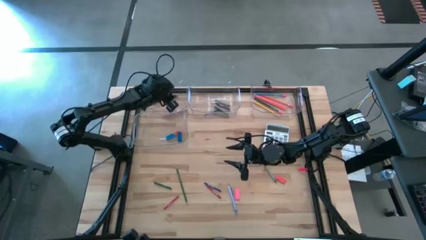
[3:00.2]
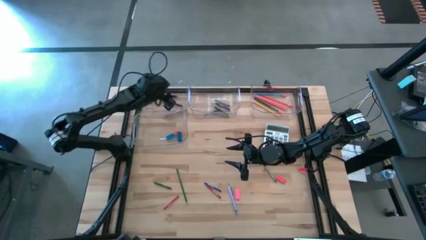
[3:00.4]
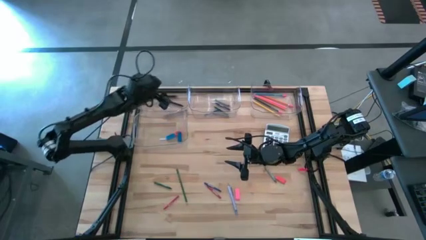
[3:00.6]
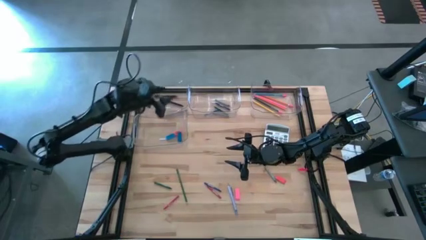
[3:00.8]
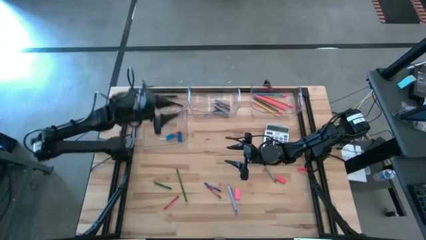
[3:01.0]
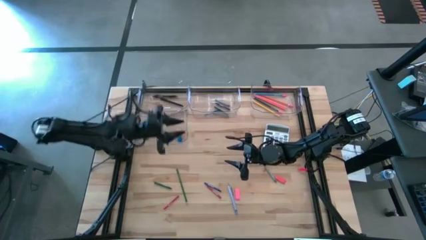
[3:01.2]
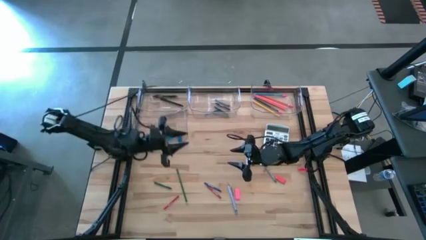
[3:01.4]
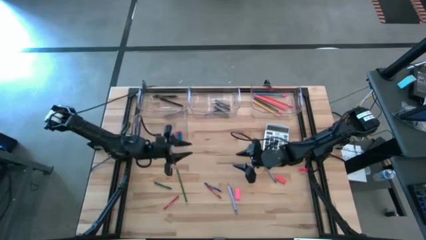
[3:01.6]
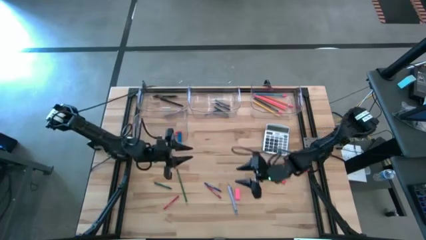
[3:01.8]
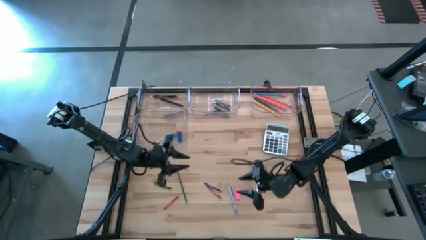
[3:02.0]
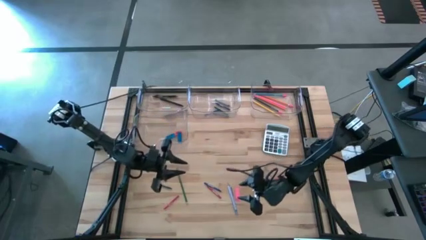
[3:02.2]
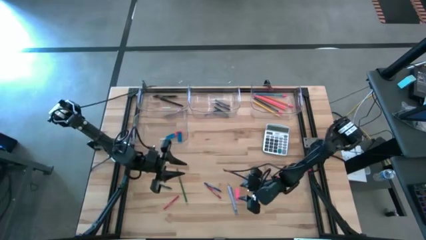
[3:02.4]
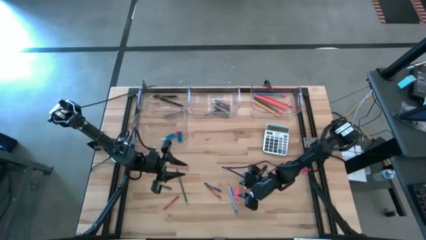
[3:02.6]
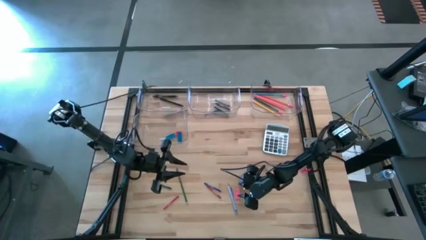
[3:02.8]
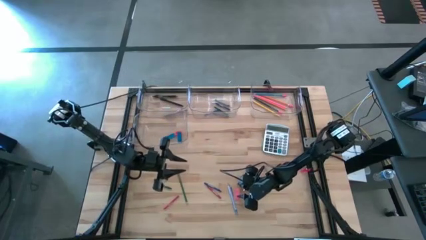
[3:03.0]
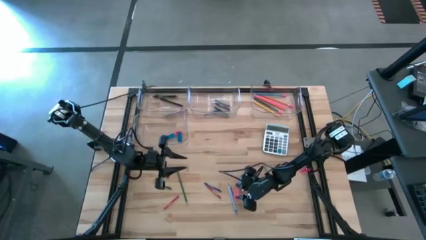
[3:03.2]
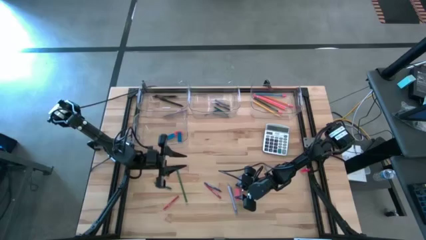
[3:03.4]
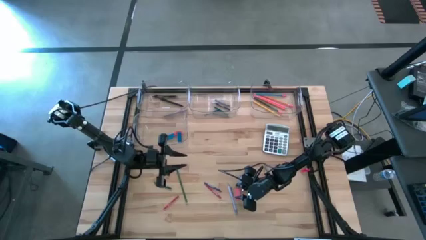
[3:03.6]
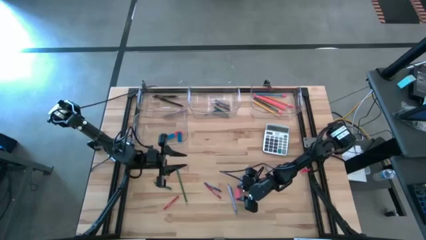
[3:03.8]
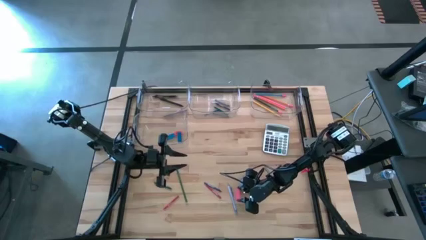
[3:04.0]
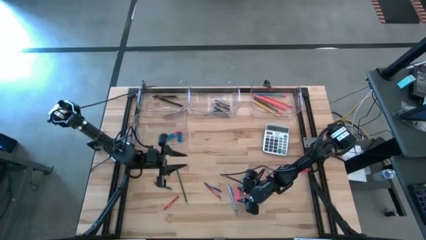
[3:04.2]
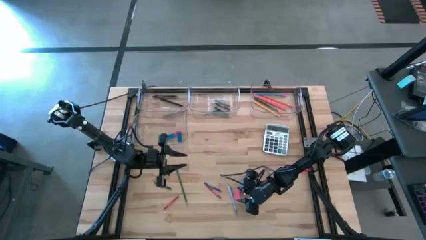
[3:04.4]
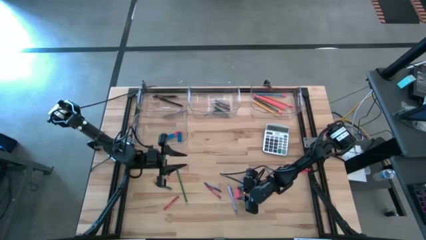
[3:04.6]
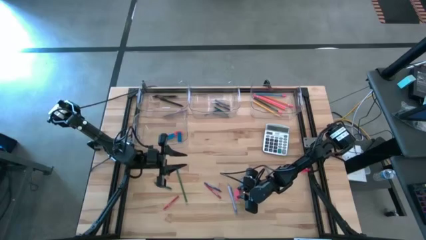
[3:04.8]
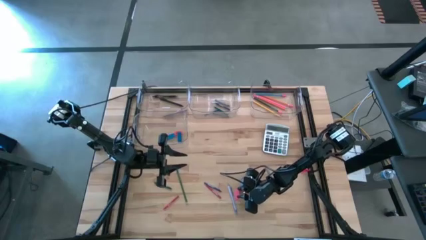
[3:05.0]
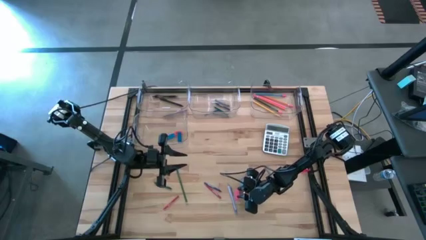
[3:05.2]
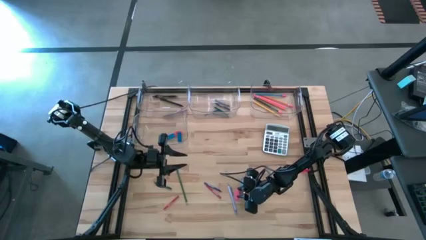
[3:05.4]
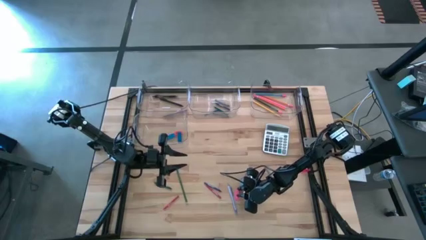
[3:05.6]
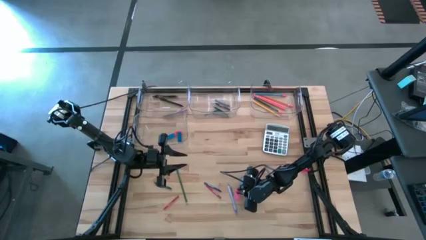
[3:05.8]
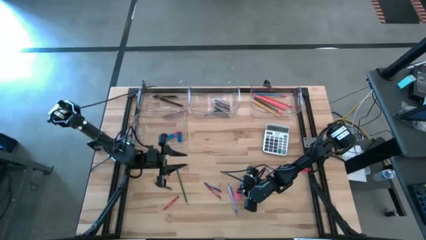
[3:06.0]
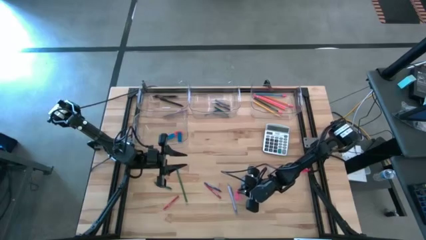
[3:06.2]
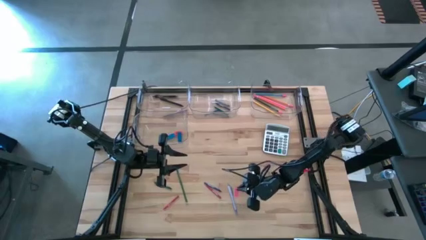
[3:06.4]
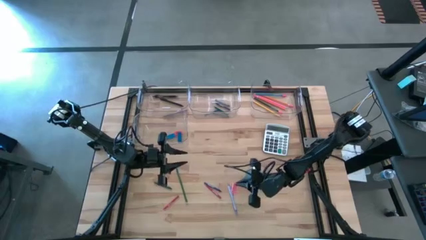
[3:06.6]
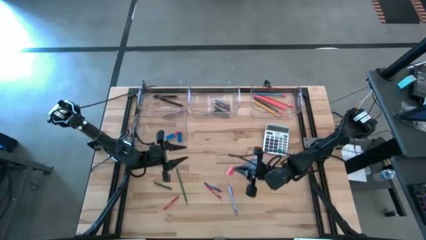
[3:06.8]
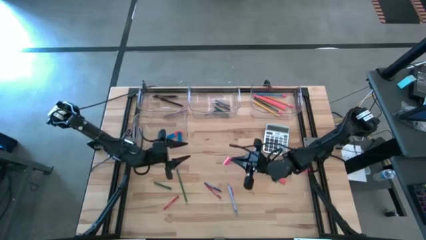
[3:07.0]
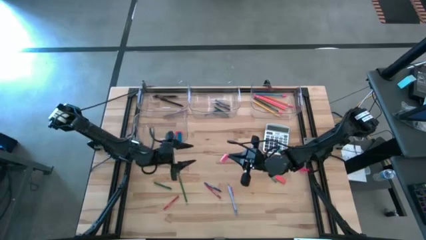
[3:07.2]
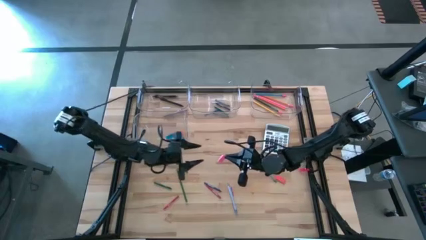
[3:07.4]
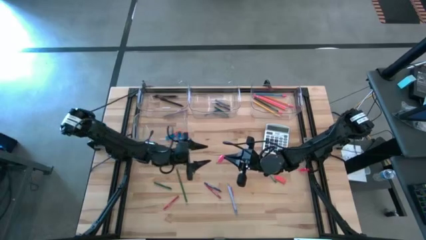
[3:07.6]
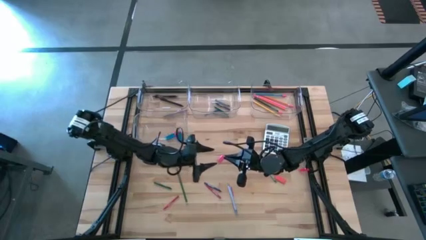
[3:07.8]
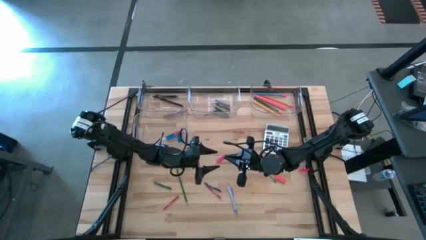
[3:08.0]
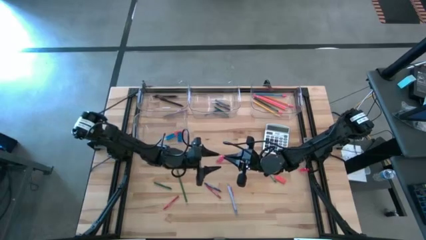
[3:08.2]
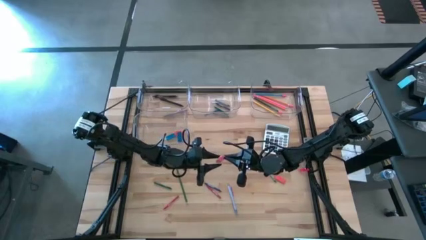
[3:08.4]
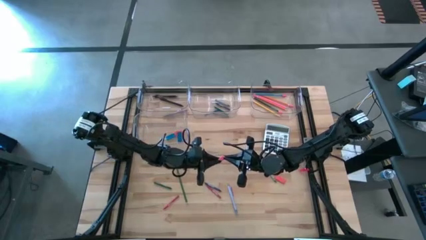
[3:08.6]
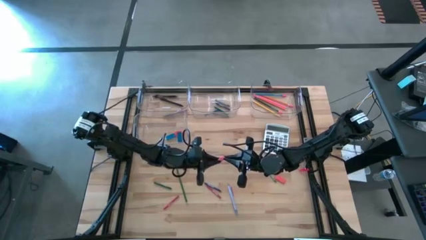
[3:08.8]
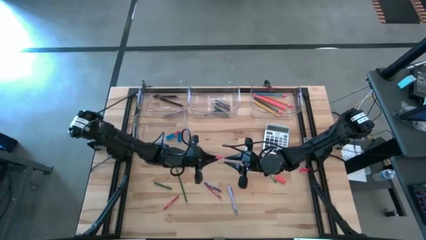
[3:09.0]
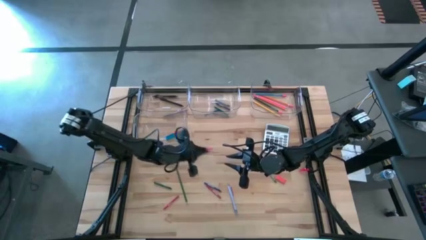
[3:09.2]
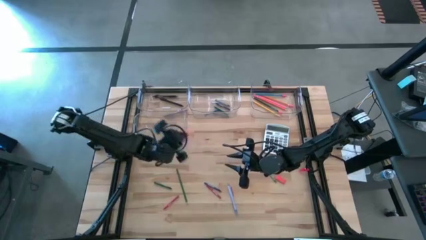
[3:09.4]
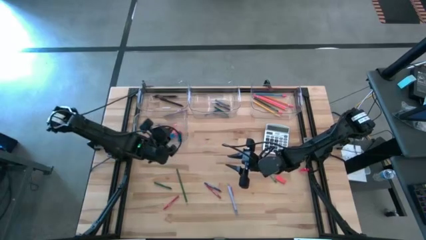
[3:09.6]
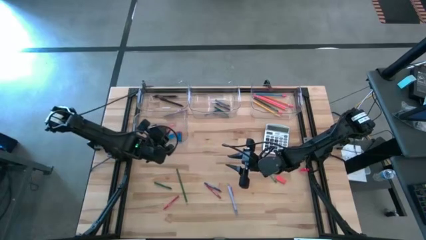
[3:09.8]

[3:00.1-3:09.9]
Task: Sort crayons/erasers/pens/pencils in bins
Put the pink eraser into the bottom transparent bin

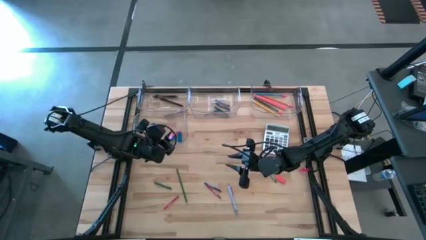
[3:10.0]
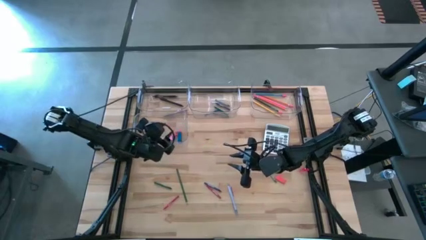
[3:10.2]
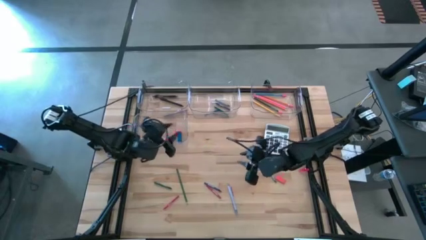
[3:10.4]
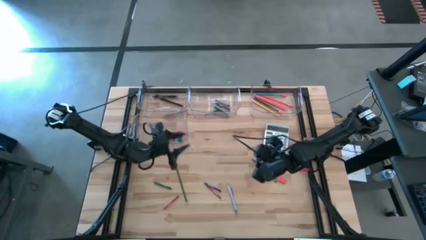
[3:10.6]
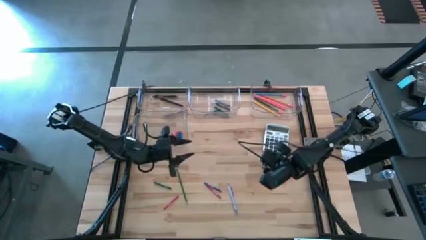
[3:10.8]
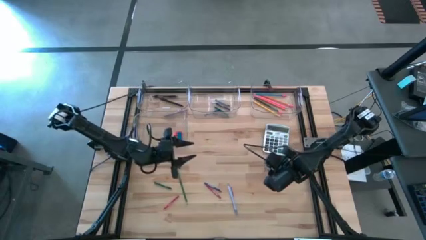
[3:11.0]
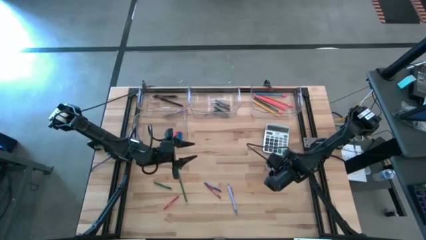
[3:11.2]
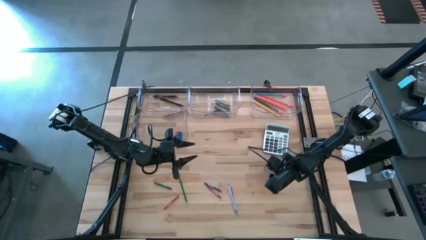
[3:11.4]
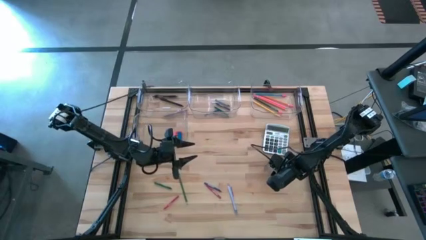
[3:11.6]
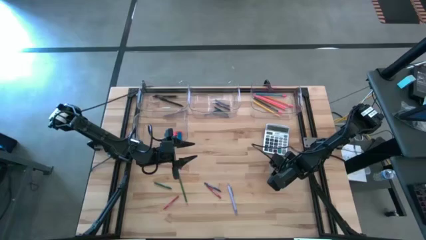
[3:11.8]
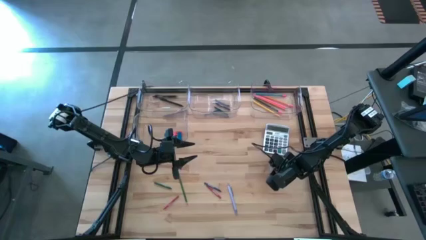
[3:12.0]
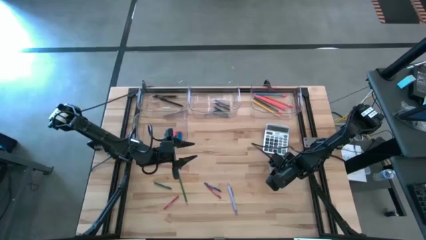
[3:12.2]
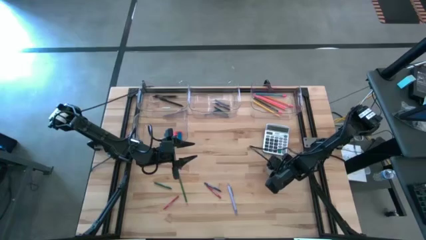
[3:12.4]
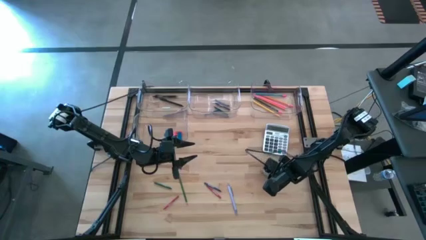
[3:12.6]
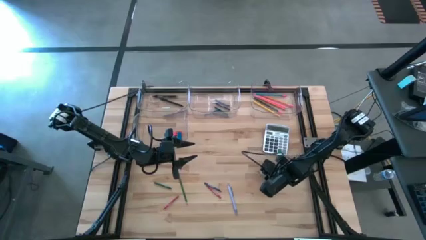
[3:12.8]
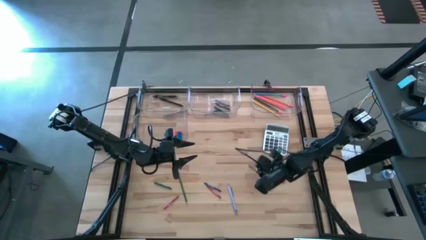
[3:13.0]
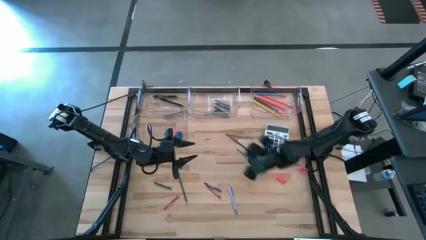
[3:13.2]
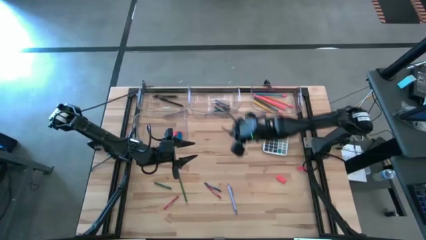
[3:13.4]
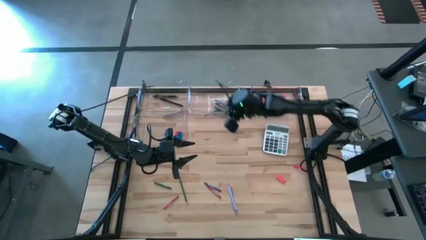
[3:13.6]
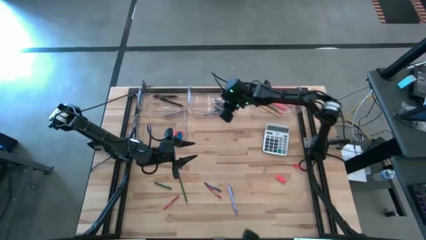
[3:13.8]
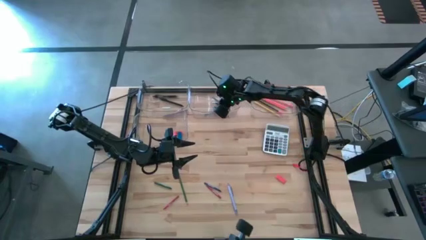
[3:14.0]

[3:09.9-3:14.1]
Put the gray crayon into the top center transparent bin

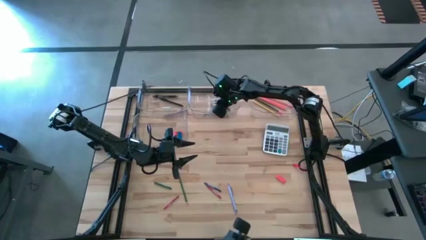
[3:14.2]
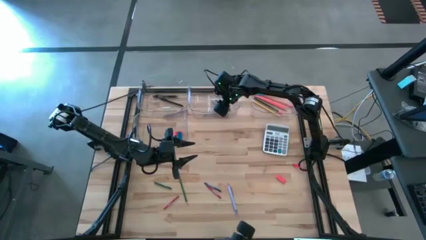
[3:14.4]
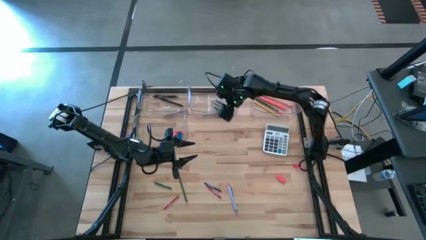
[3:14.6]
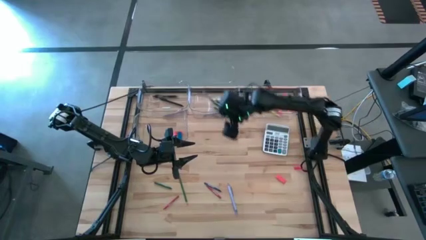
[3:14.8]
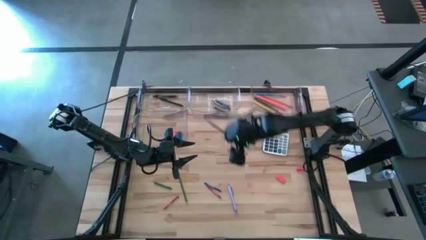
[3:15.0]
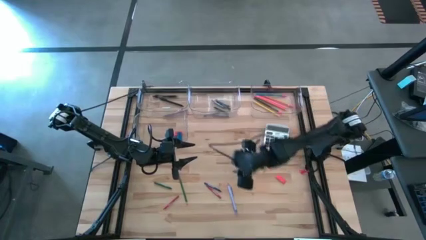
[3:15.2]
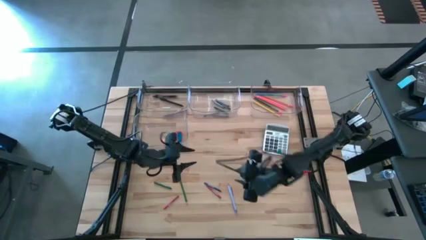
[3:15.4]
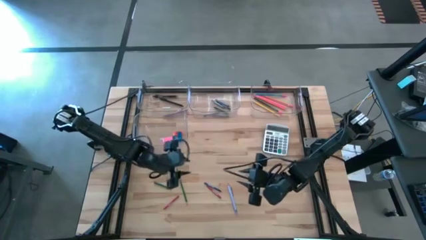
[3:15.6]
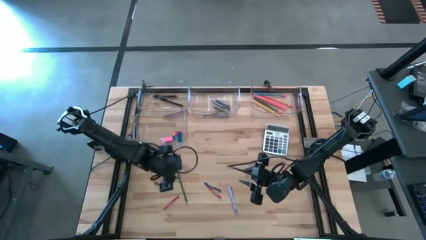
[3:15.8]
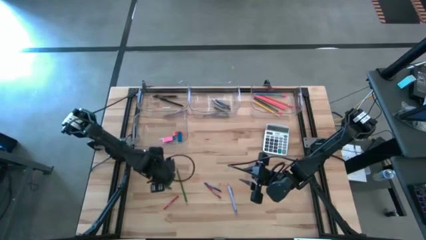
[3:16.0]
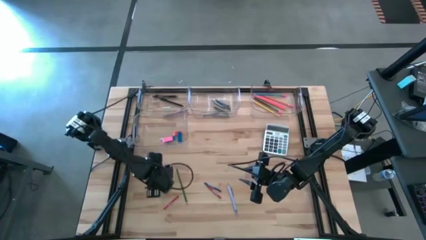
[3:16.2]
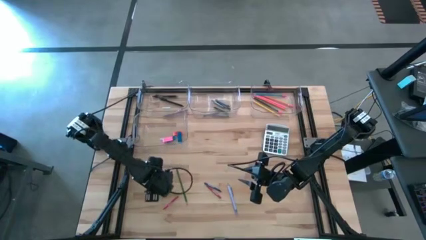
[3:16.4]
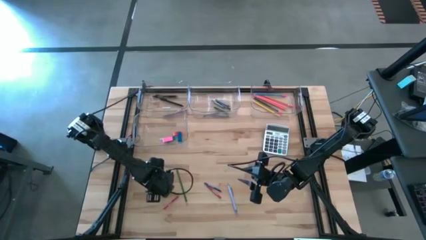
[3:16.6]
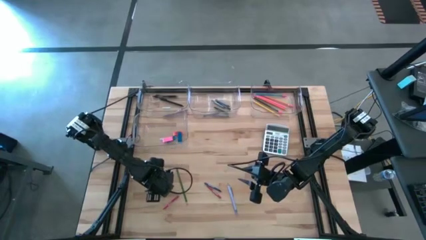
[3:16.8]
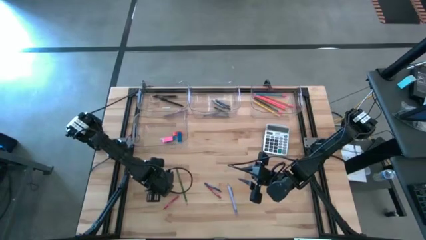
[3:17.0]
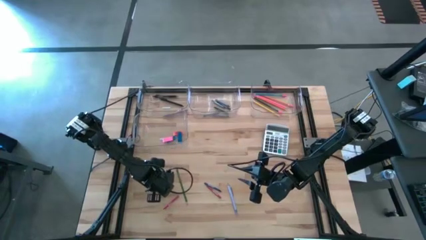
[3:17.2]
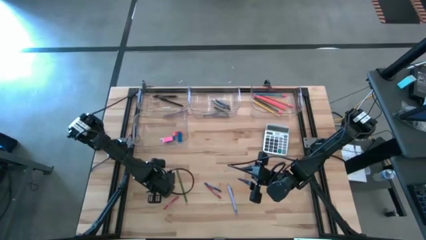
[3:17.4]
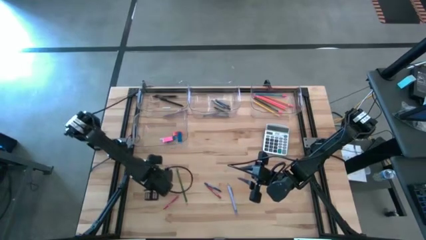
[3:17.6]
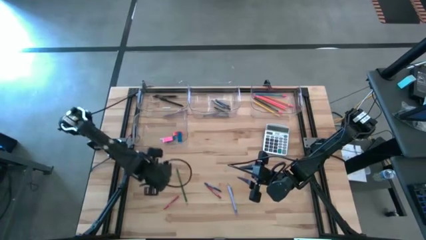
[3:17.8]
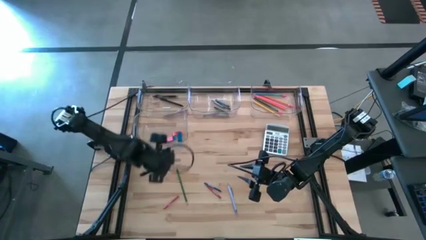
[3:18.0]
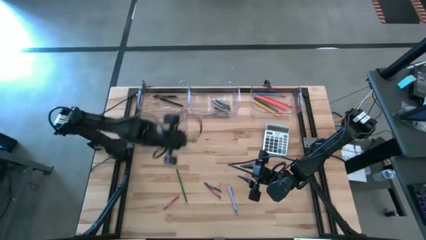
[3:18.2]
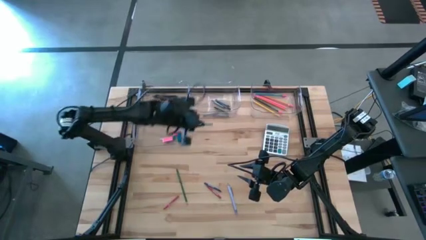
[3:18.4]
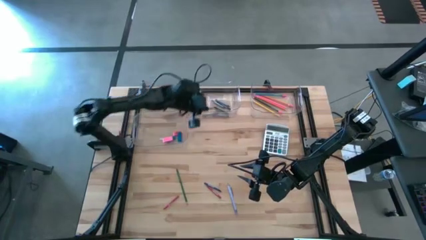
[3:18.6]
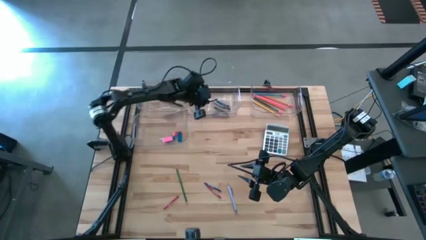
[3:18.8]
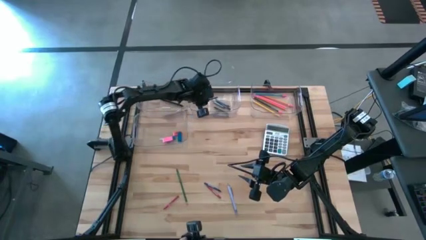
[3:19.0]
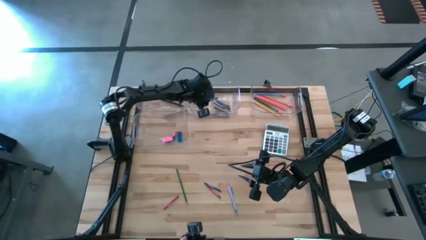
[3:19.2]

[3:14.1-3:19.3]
Put the green crayon into the top center transparent bin
